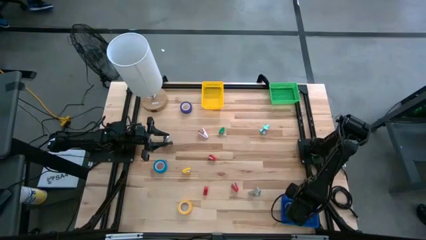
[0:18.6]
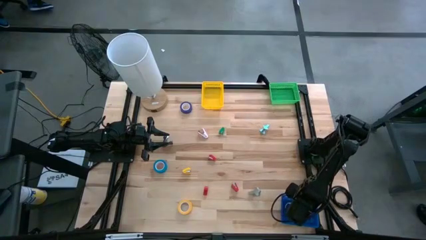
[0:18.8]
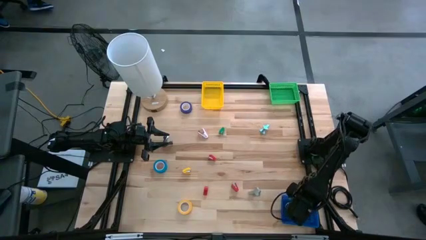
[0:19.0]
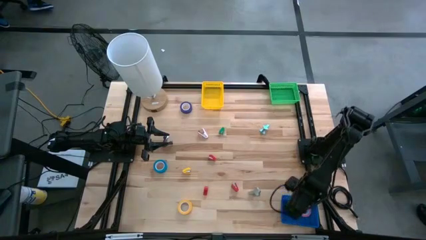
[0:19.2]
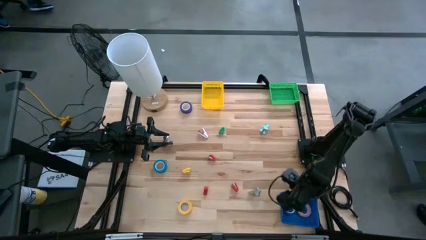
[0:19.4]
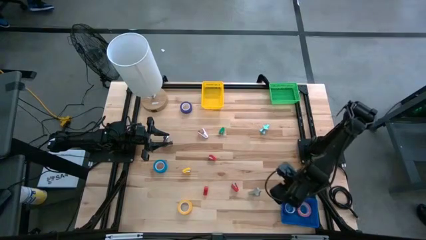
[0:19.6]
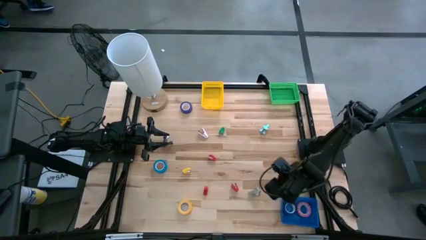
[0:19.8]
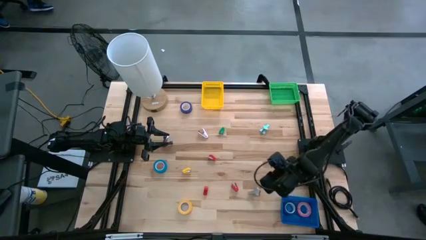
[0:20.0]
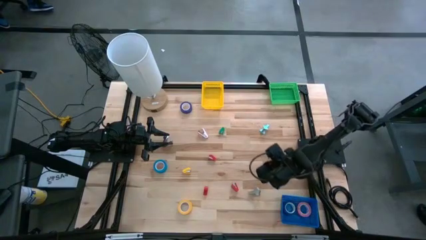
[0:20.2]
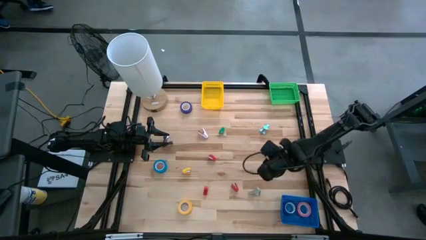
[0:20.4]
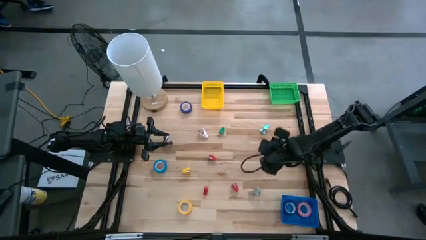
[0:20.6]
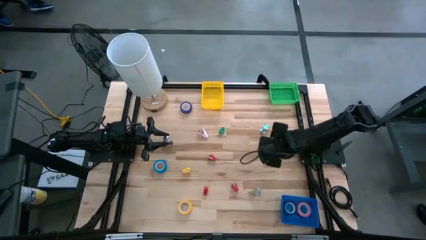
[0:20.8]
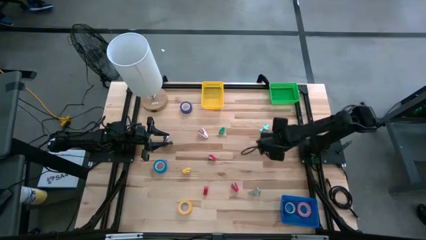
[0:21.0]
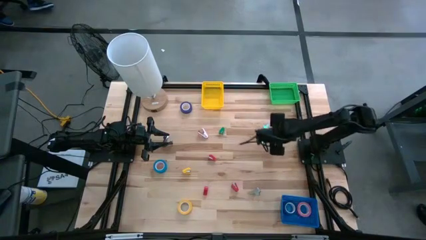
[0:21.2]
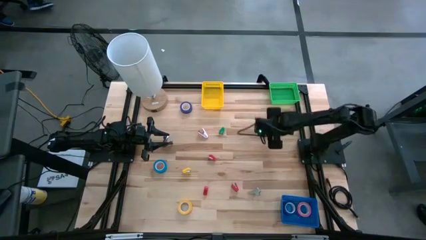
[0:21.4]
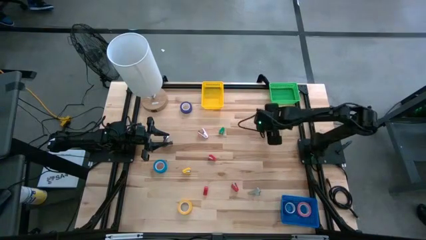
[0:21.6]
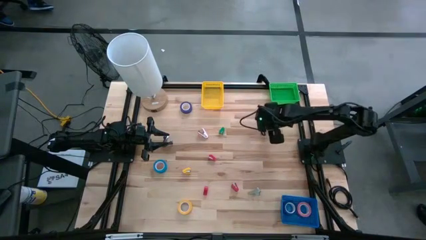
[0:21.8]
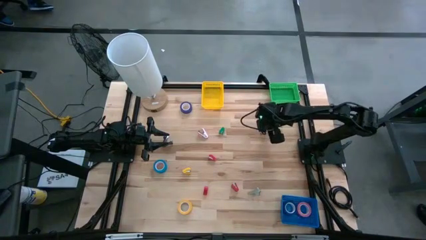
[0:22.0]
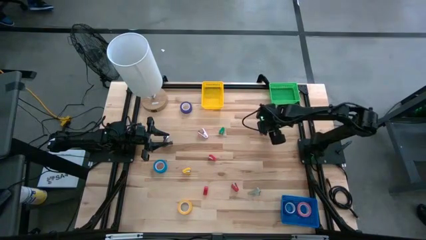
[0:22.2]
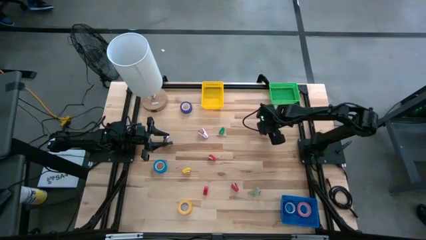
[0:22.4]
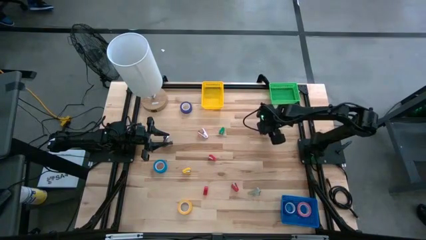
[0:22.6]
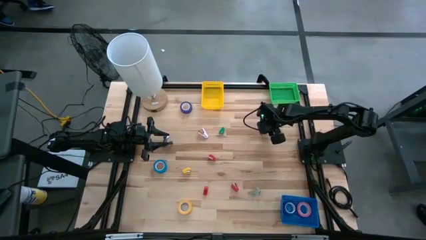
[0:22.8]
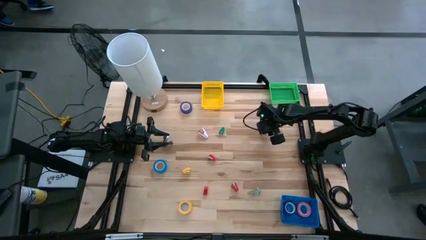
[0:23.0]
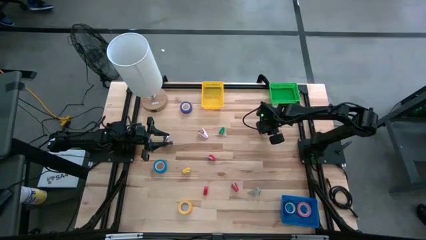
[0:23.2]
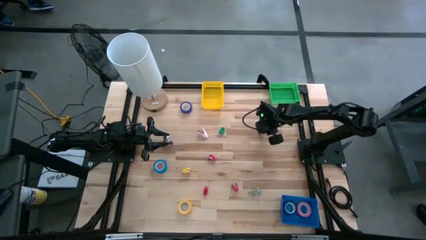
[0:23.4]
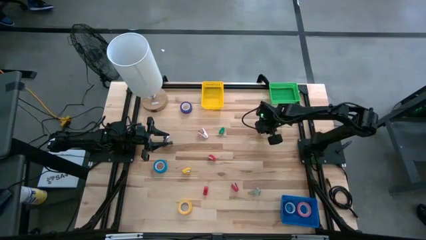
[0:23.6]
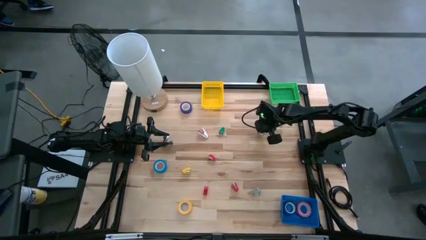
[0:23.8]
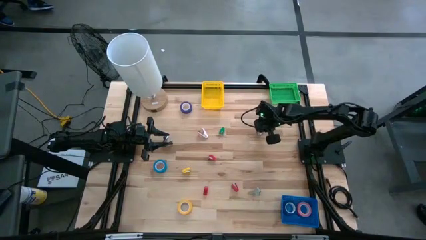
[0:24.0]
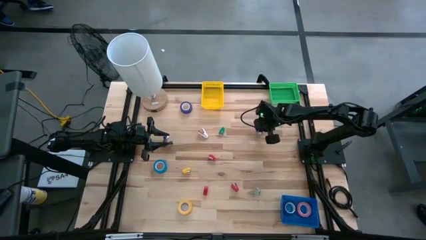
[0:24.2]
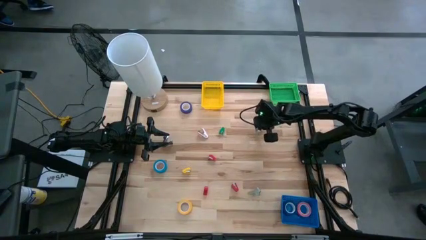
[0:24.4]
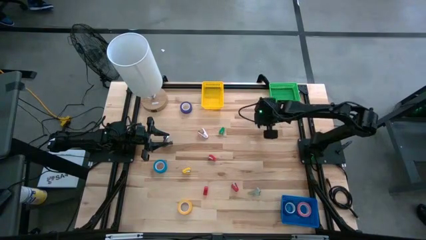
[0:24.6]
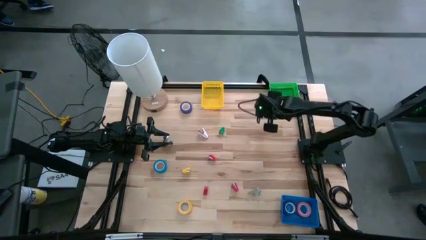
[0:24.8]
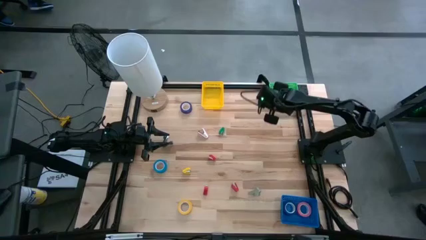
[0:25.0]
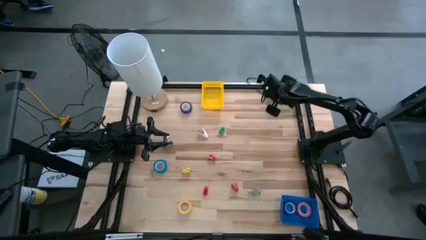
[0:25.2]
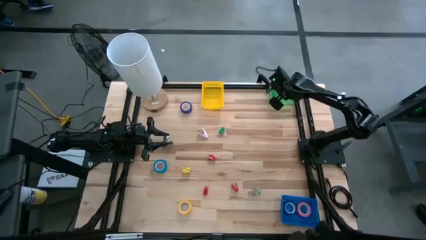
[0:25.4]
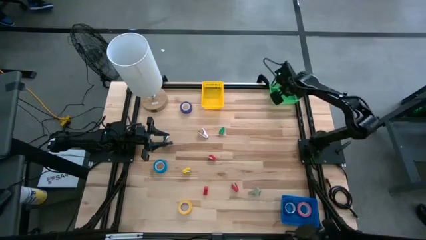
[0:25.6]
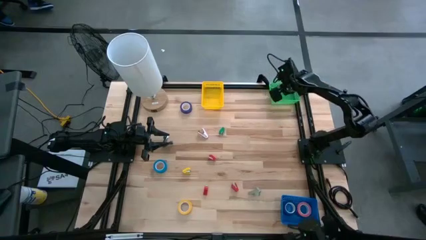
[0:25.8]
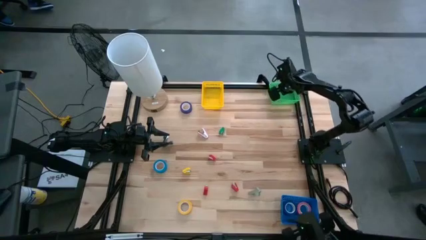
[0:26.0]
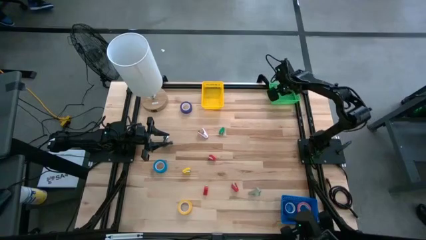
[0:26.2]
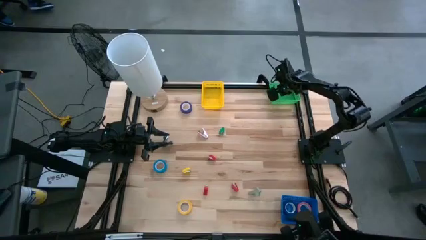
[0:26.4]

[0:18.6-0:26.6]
Task: Pick and place Stapler, Stapler remover, tape
Put the blue staple remover into the green bin

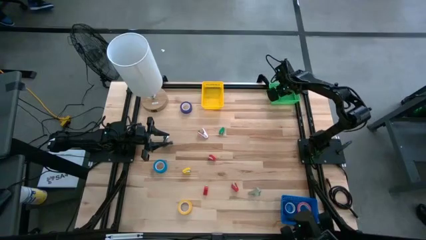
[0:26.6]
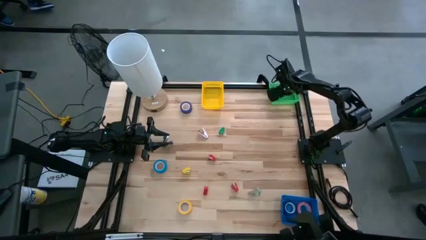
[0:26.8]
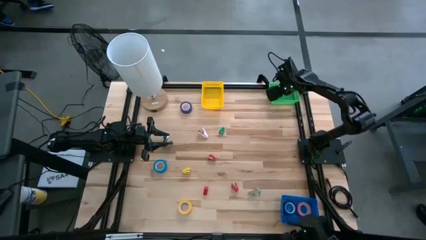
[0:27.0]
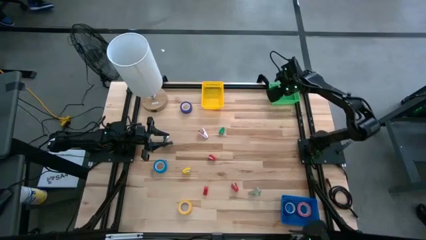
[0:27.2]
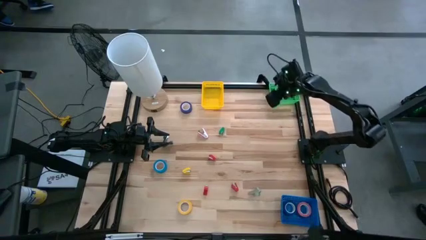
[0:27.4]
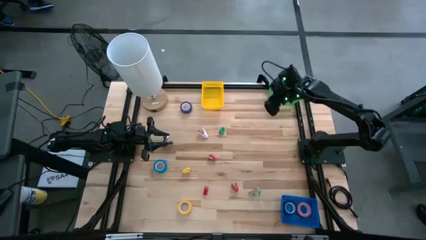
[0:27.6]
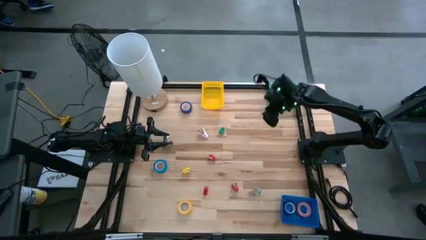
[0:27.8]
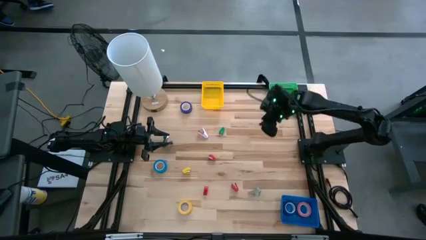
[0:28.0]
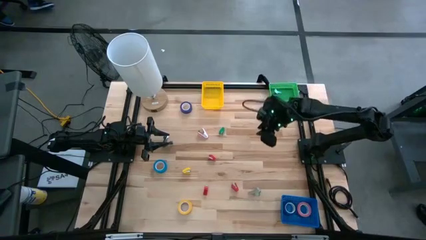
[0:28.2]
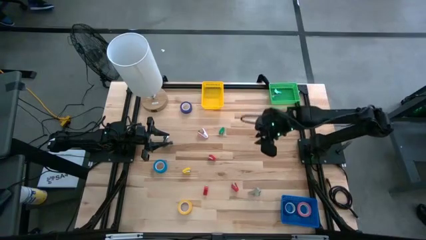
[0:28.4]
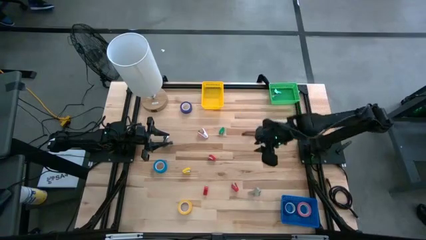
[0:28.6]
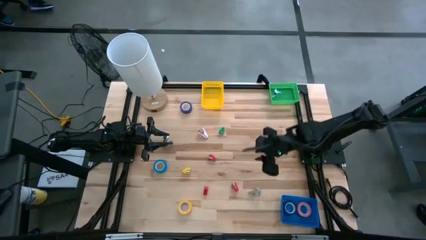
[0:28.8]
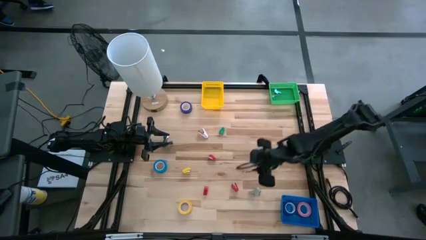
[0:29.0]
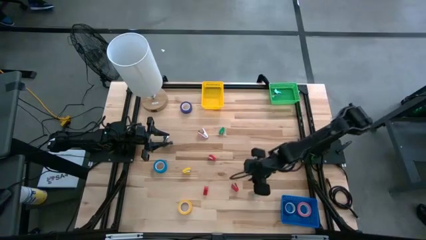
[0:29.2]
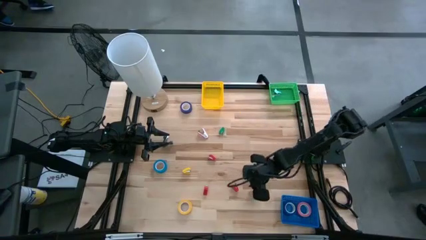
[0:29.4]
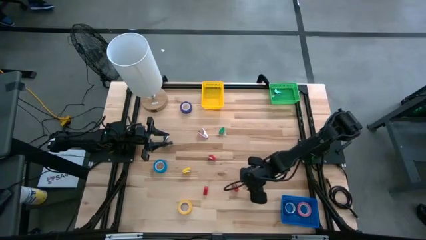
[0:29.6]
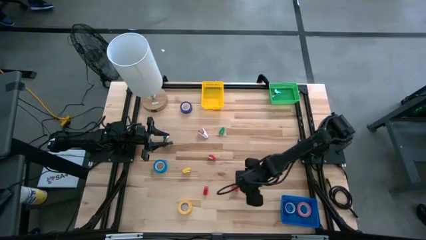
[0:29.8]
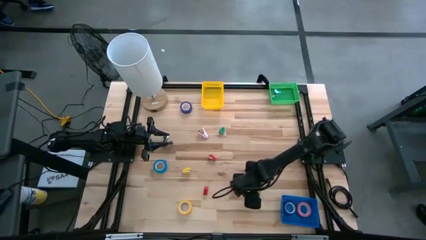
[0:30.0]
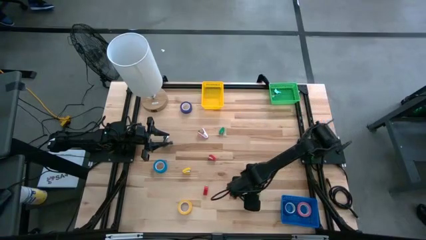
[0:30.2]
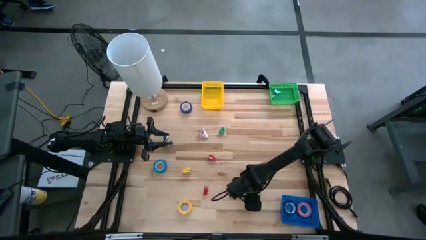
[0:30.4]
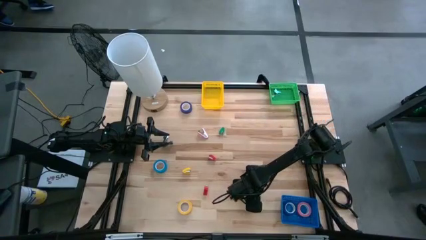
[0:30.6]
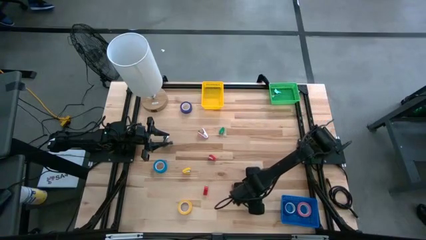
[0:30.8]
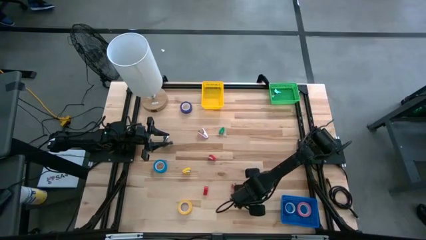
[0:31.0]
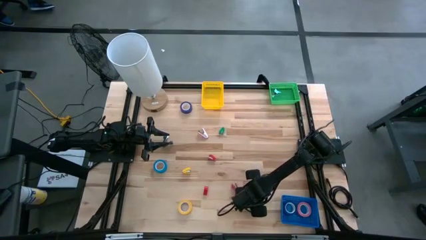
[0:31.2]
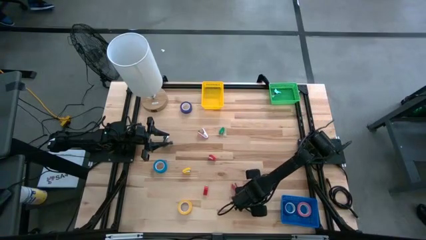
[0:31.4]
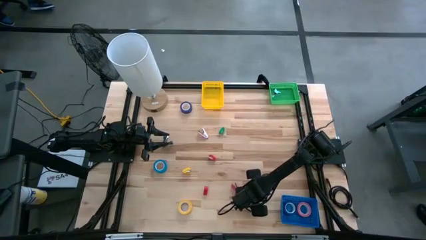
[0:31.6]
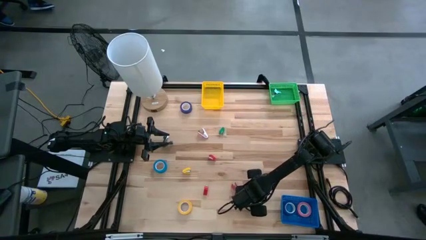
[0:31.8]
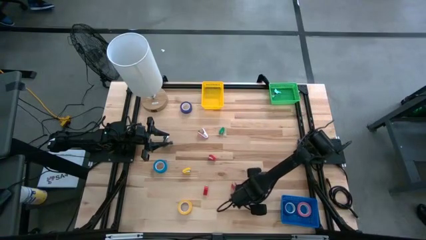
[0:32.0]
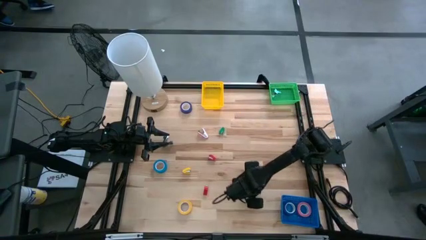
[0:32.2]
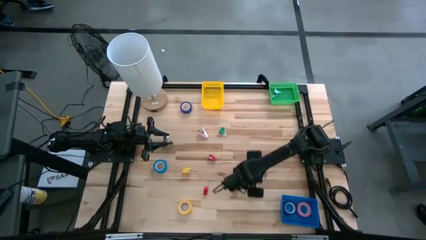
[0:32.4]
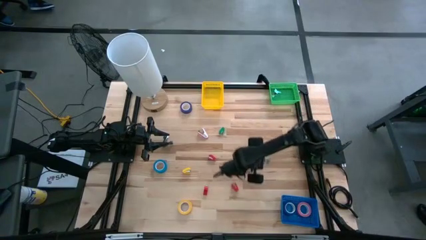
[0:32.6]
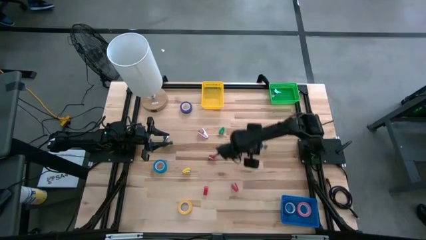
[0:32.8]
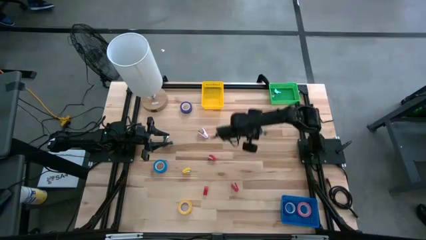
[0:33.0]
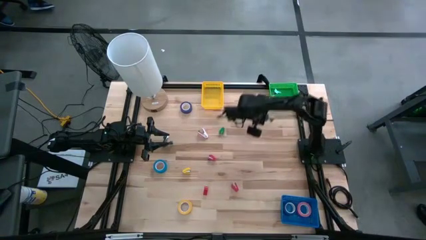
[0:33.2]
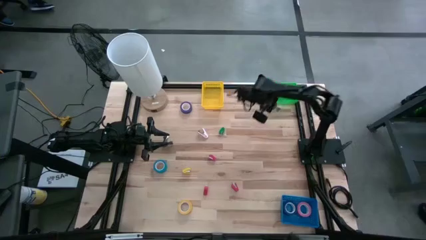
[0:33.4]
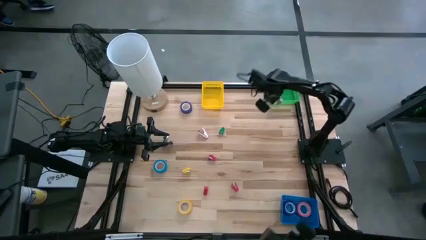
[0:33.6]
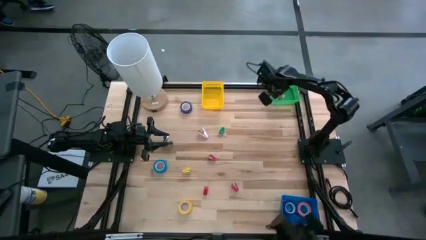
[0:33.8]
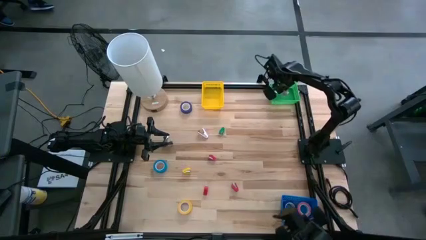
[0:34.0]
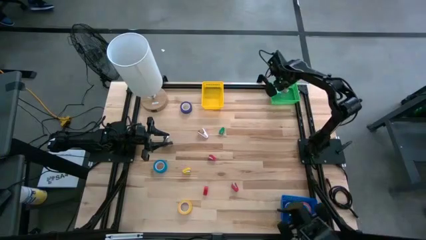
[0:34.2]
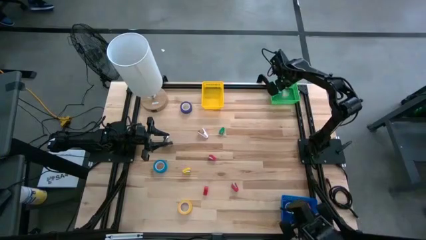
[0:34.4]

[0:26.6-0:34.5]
Put the gray staple remover into the green bin
